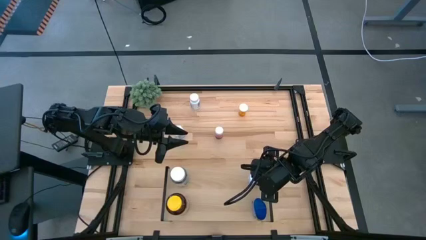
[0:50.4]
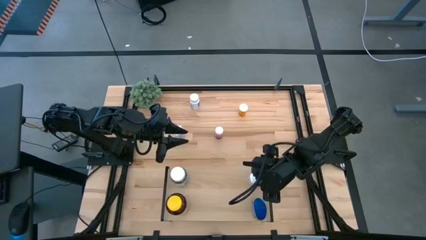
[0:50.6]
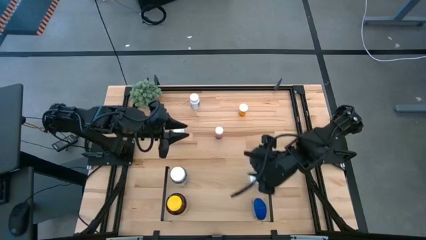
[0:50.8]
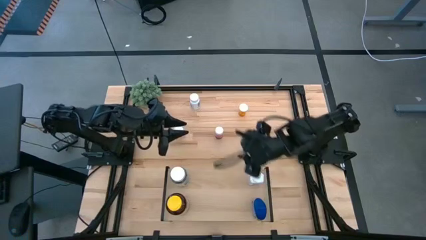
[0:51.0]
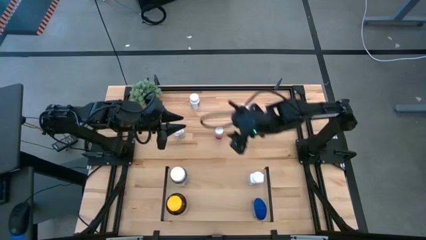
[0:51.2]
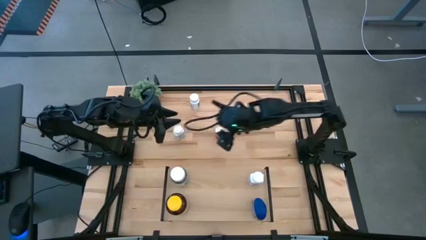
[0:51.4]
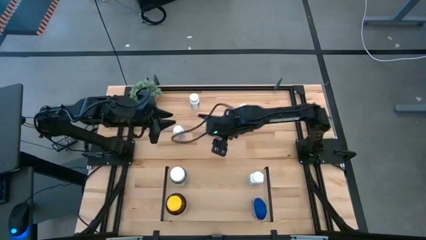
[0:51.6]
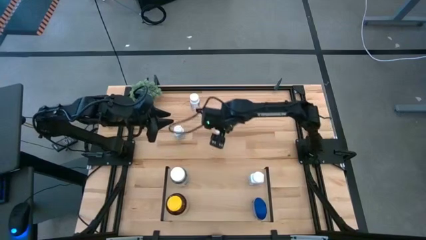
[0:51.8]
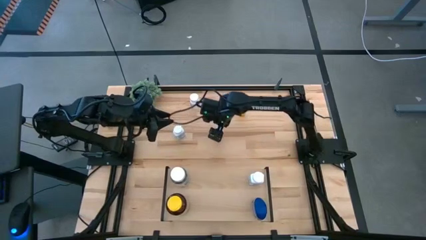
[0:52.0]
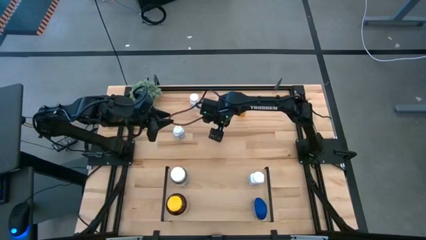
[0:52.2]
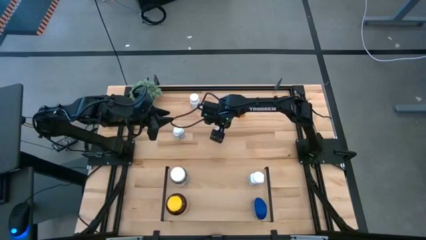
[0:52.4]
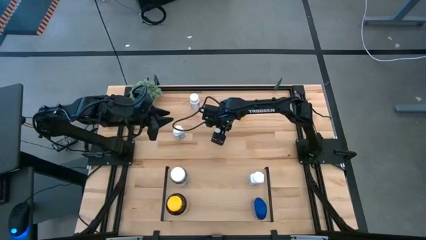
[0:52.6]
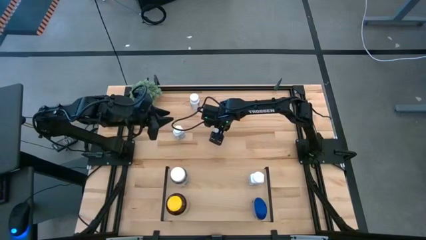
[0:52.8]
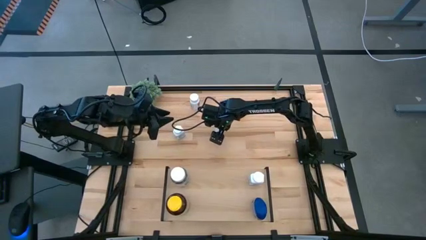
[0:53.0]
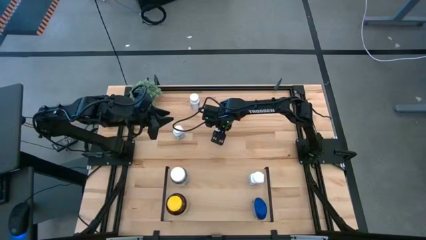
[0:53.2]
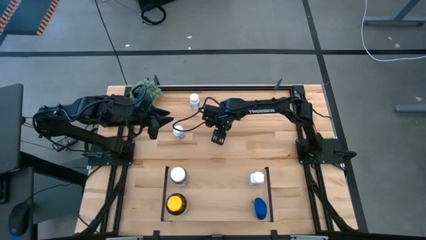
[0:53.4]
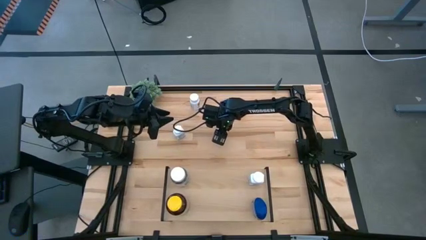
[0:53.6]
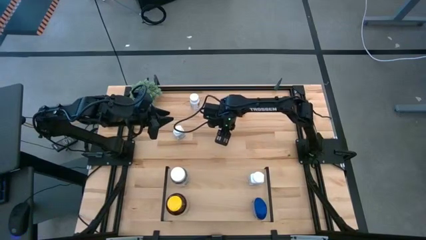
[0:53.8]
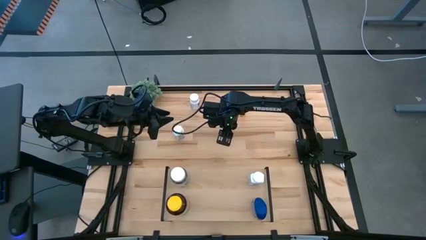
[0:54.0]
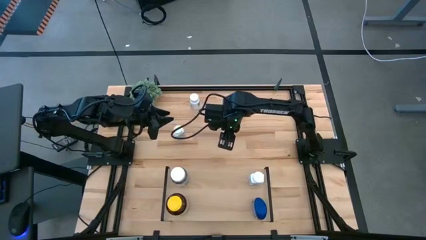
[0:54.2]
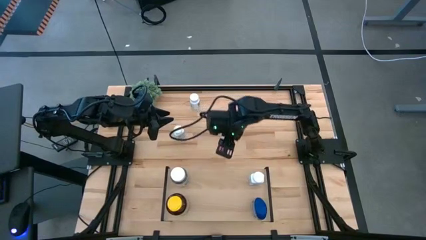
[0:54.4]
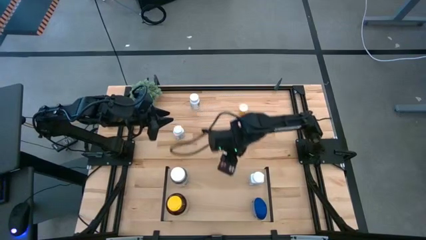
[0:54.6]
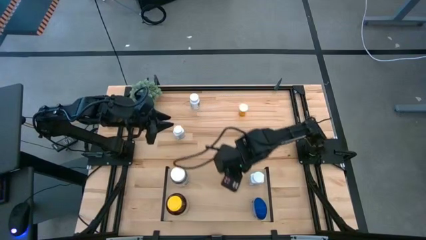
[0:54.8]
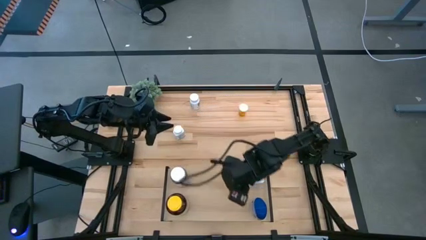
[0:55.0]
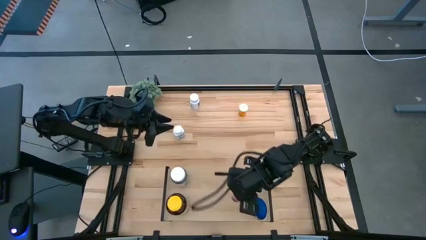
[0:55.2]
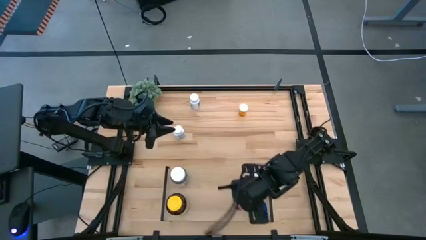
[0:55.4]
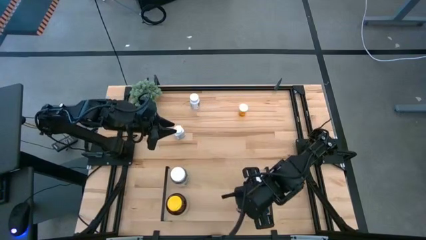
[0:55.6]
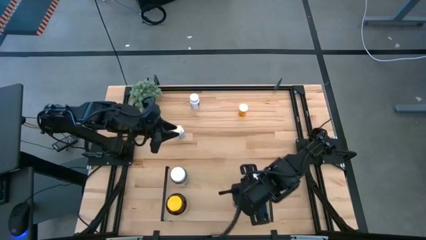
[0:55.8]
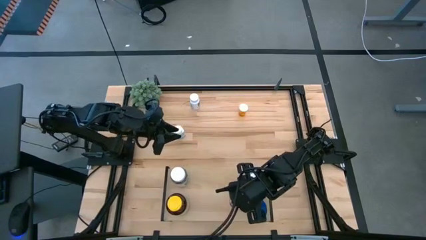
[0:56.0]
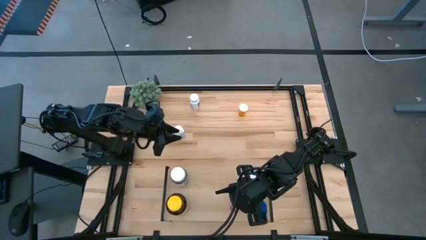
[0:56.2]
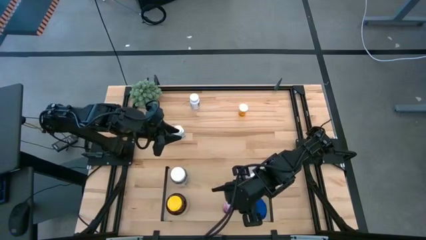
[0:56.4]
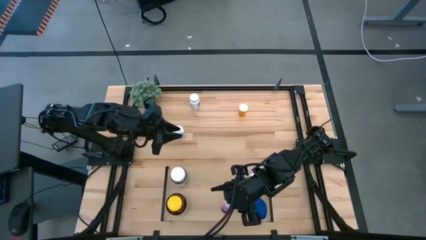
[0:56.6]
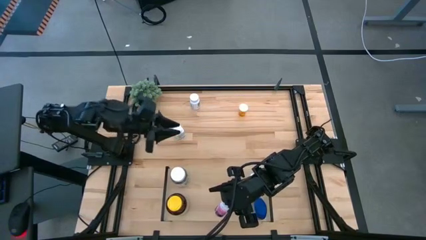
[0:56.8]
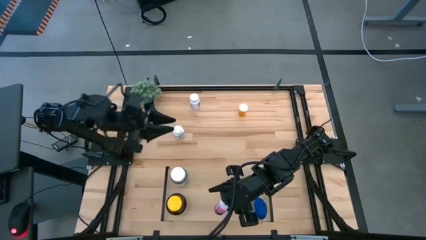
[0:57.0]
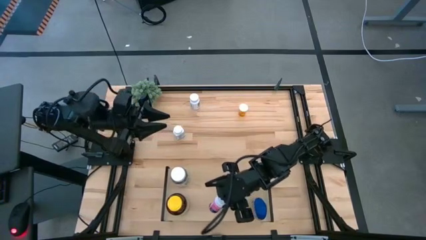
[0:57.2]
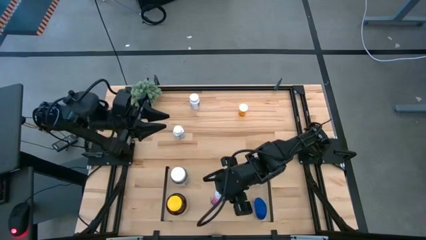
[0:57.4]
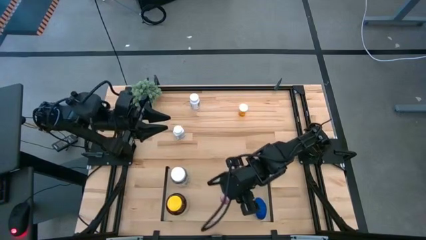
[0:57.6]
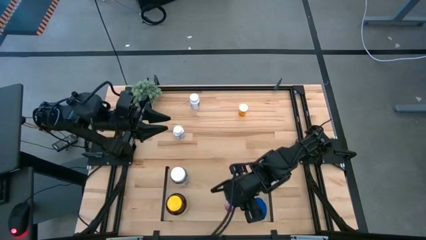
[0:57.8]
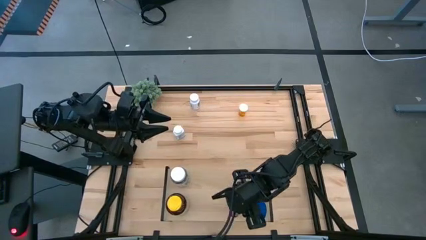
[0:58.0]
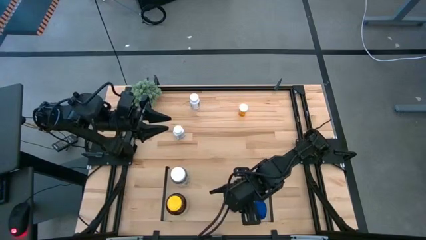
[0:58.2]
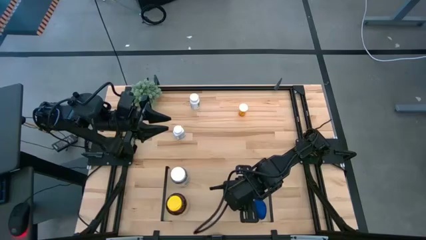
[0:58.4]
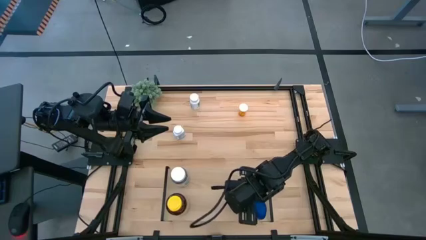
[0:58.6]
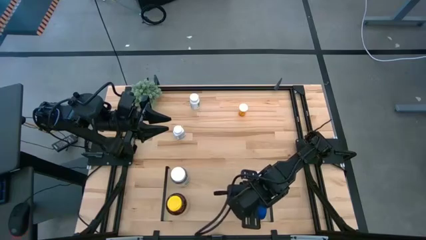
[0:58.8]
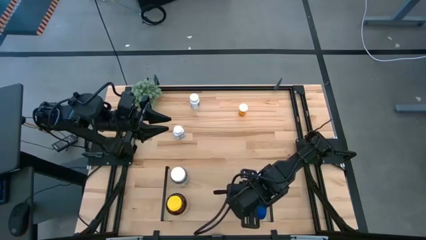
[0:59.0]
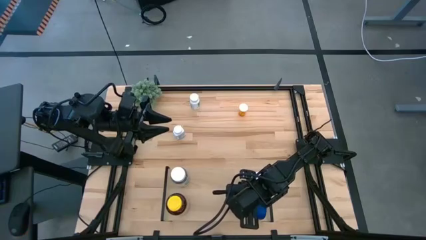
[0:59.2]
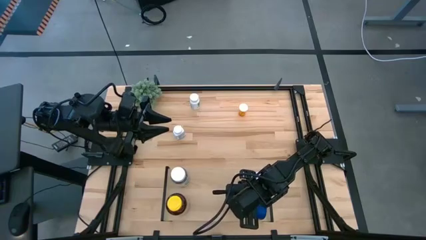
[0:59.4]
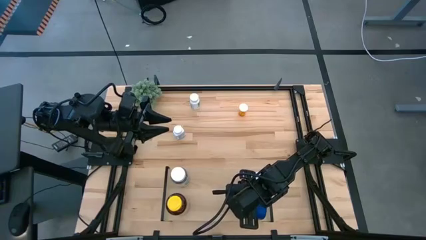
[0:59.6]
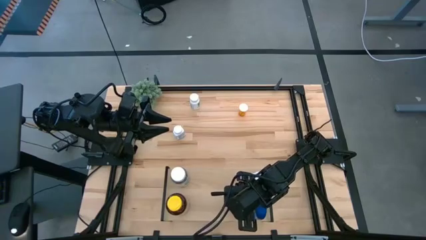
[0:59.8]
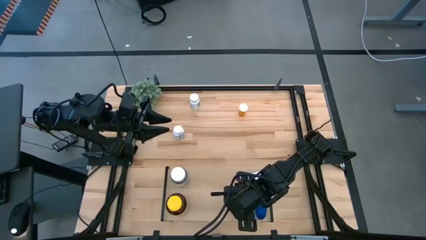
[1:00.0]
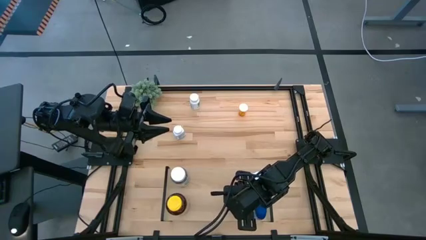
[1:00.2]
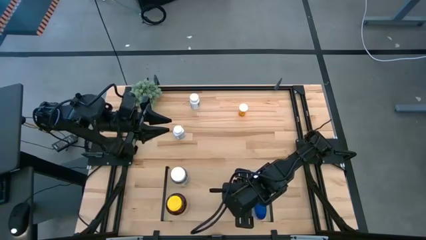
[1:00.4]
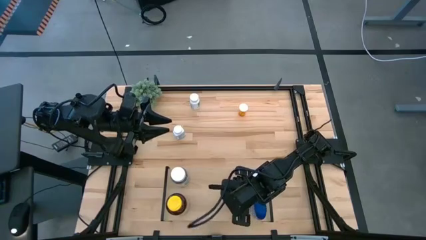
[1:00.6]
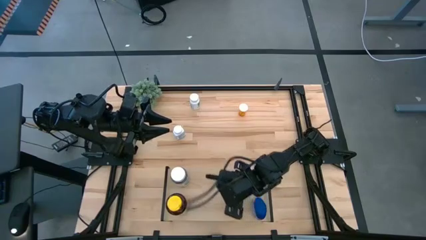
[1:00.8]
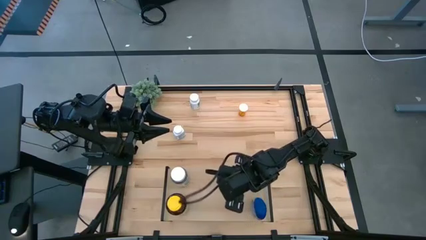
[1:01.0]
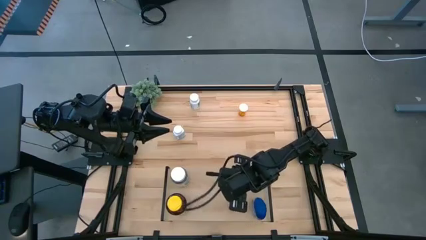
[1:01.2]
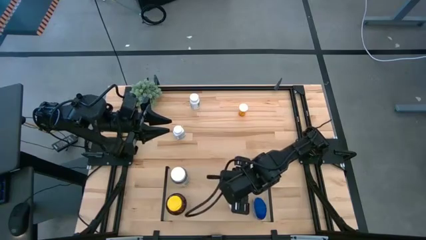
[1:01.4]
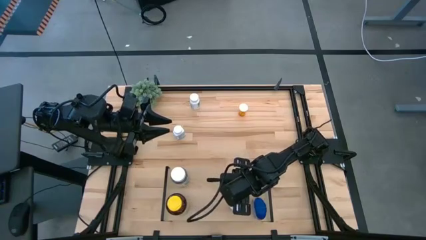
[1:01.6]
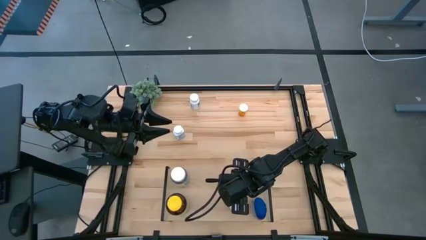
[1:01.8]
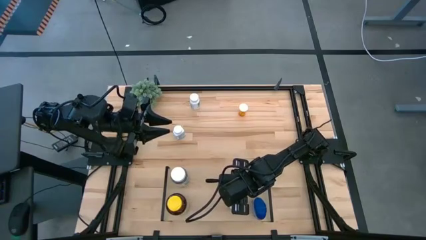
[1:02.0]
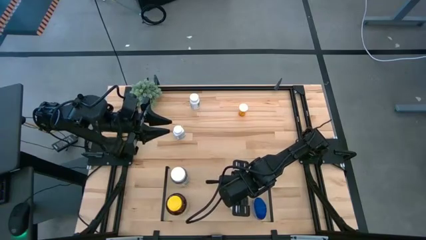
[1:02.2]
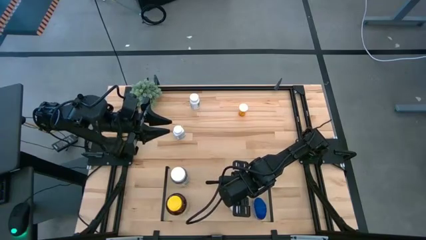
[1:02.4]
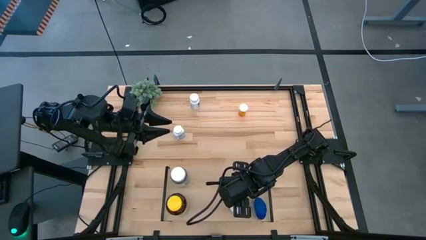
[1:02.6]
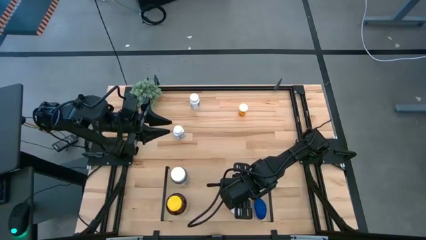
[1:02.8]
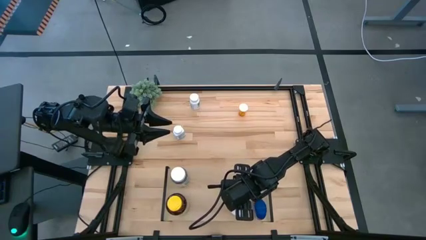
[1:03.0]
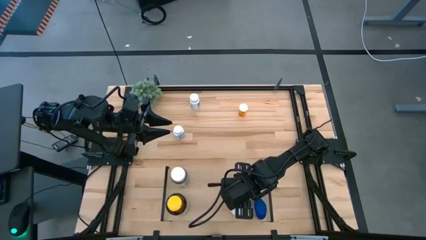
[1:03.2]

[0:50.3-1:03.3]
Task: Pick and place medicine bottles onto shelf by color
Put the pink pill bottle on the shelf
